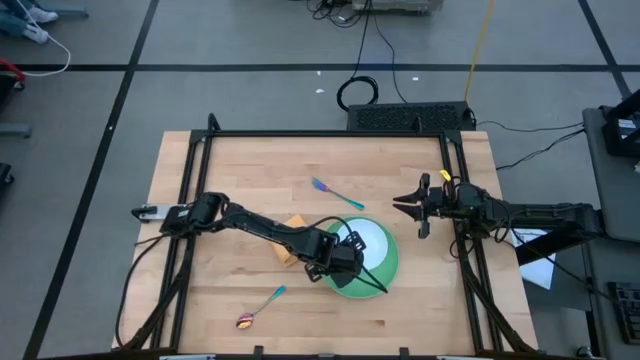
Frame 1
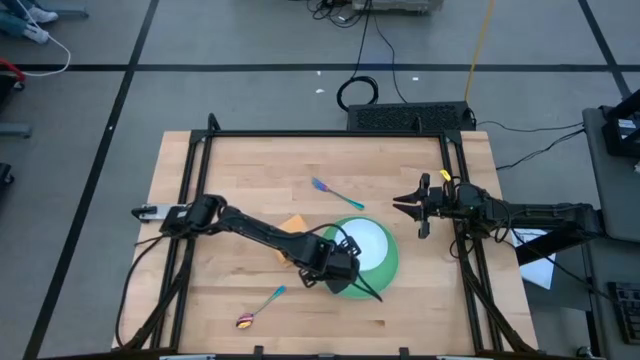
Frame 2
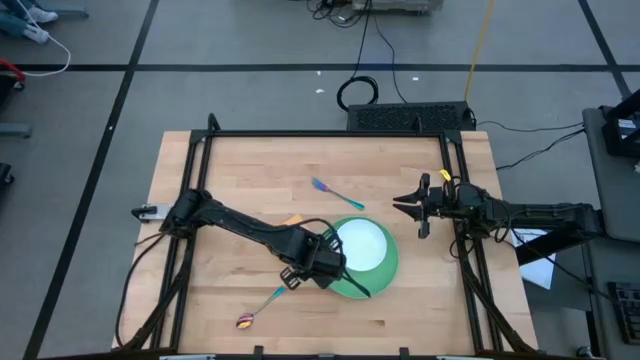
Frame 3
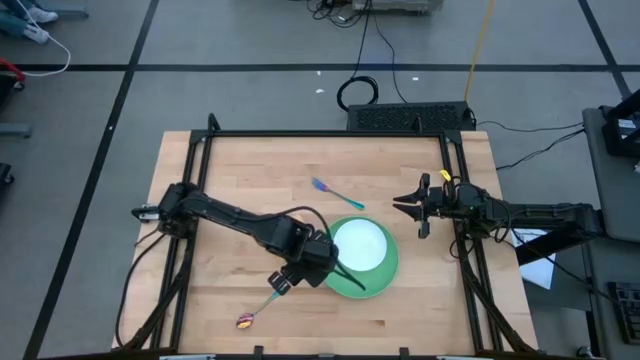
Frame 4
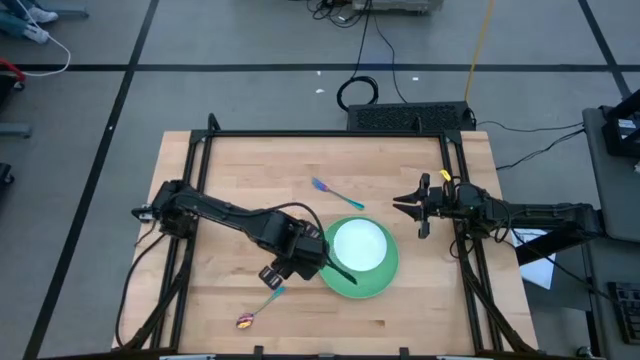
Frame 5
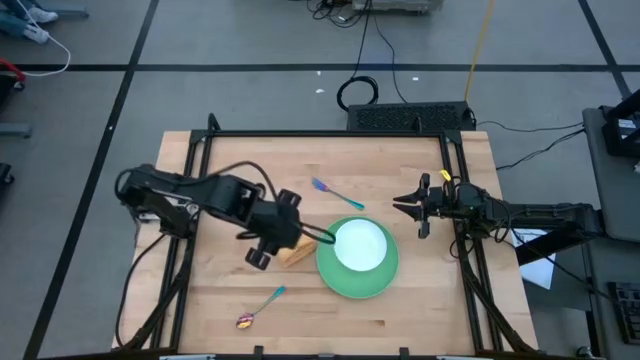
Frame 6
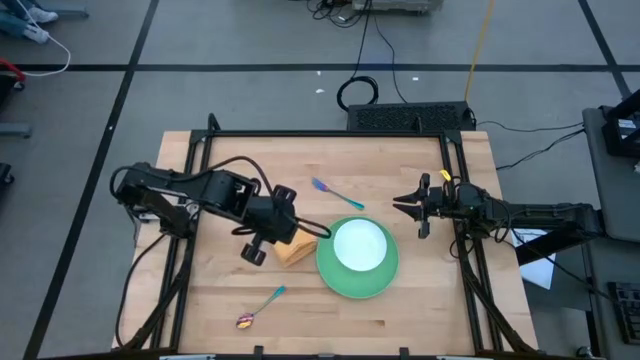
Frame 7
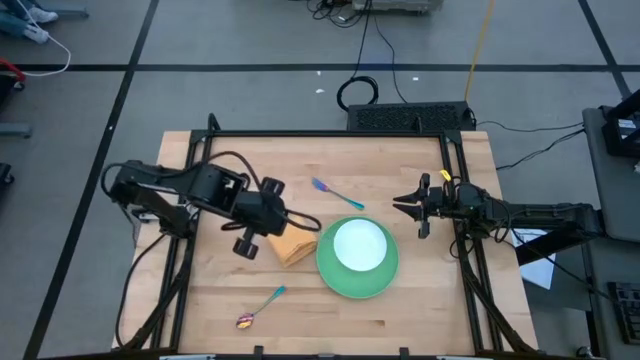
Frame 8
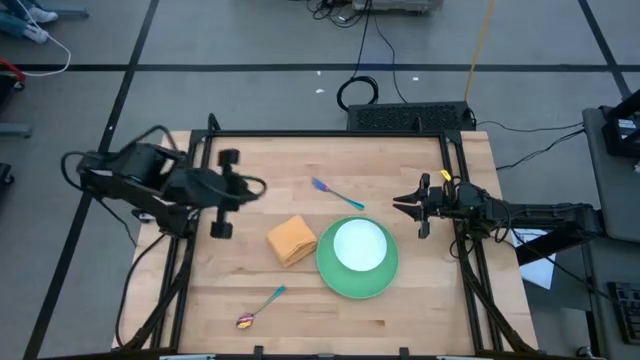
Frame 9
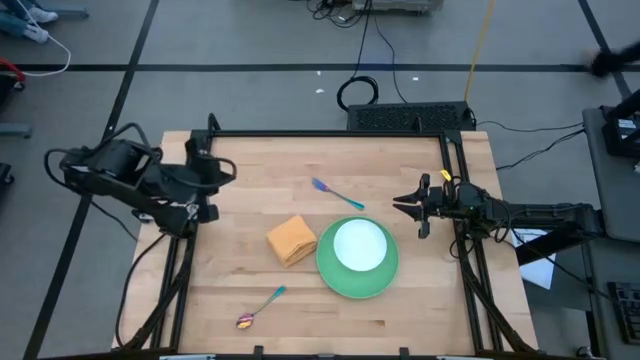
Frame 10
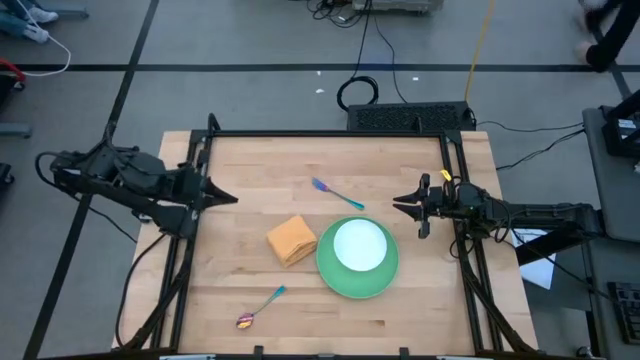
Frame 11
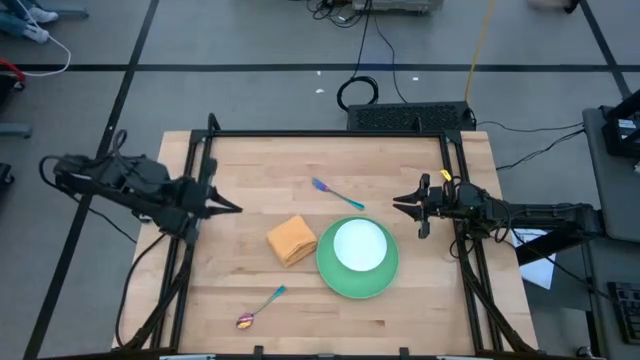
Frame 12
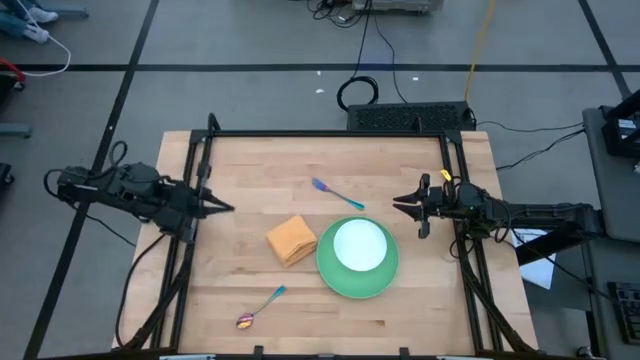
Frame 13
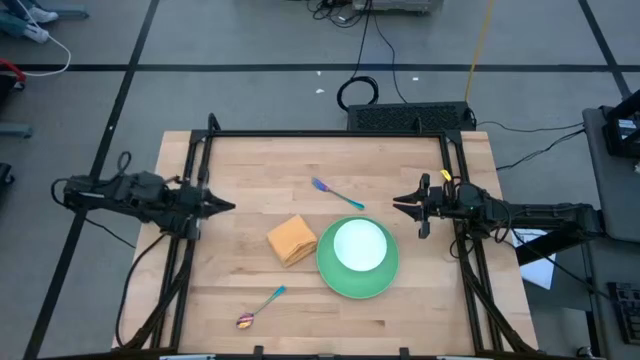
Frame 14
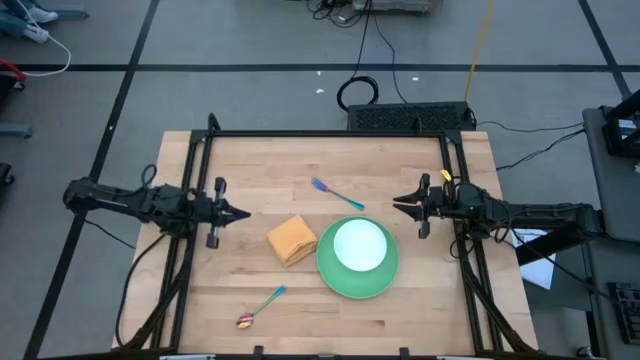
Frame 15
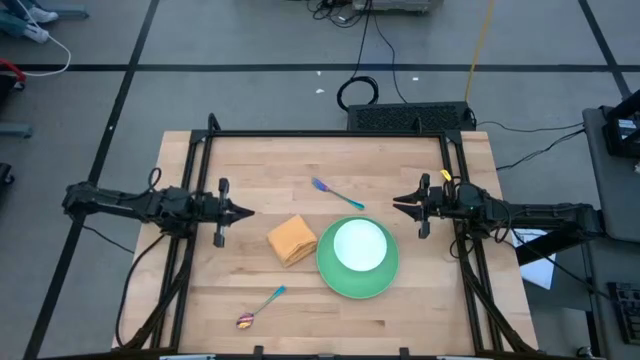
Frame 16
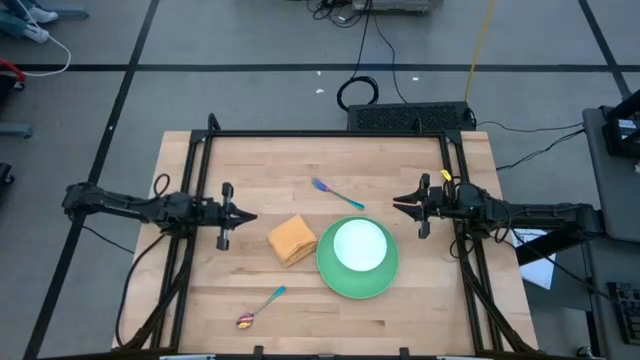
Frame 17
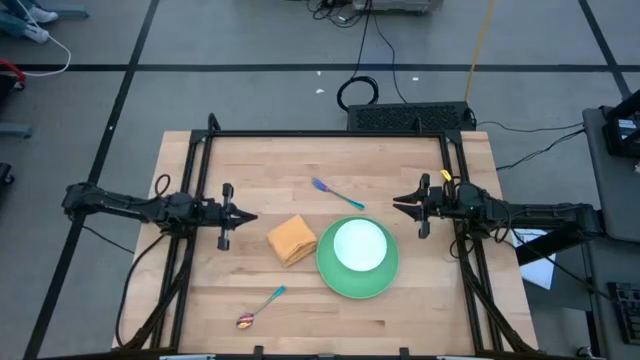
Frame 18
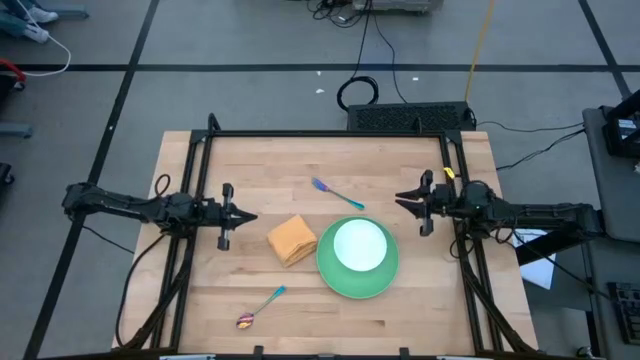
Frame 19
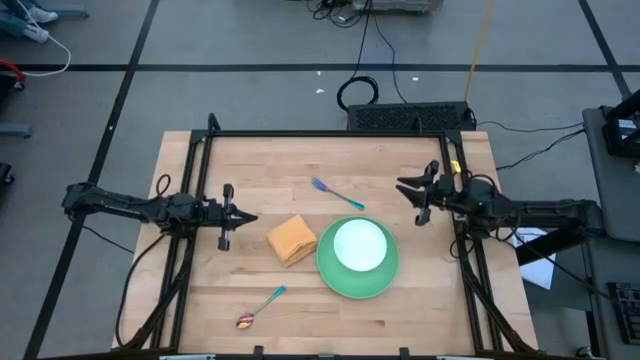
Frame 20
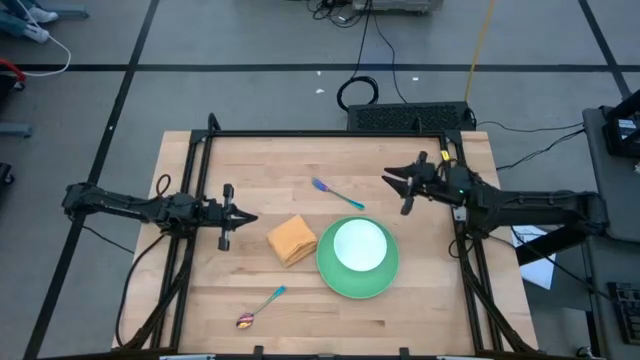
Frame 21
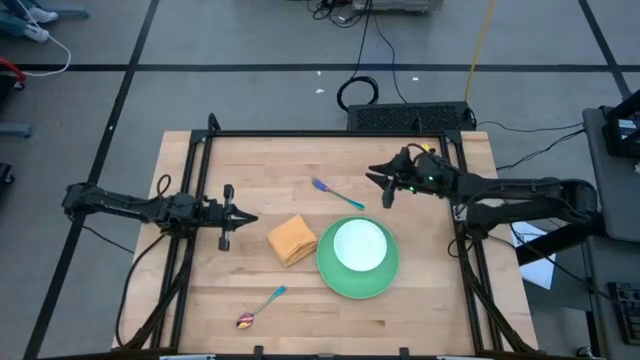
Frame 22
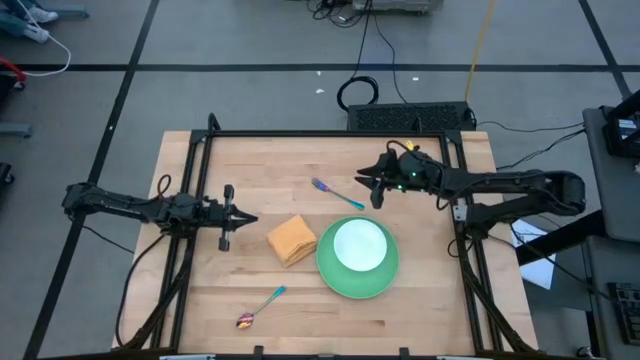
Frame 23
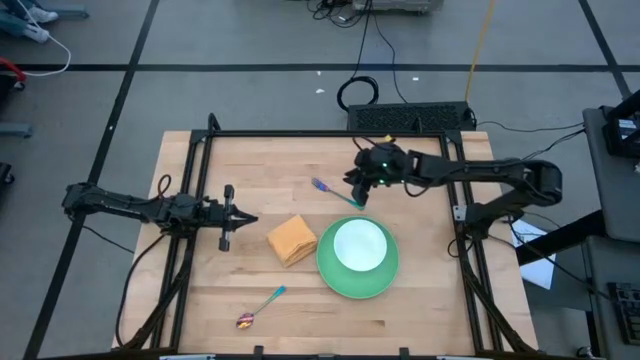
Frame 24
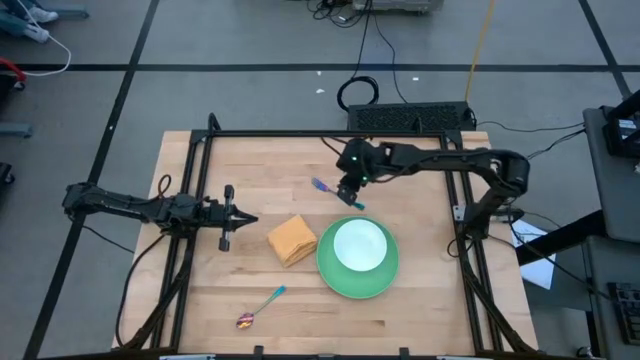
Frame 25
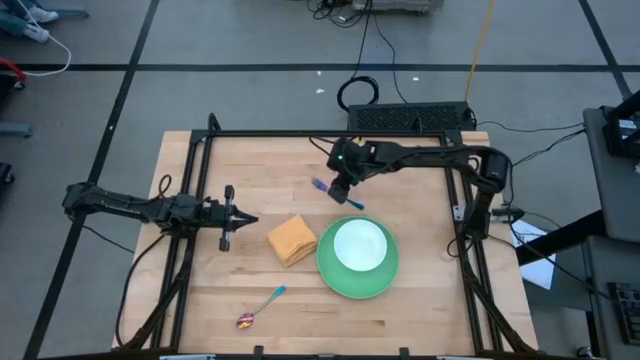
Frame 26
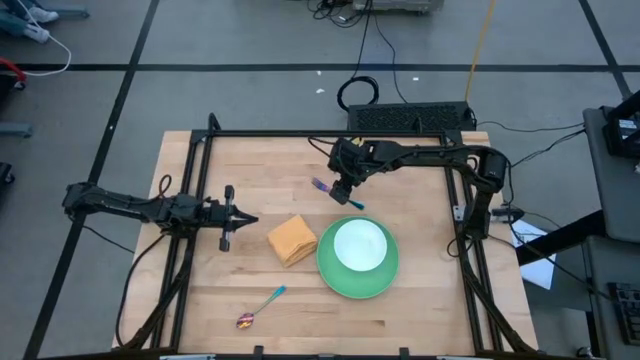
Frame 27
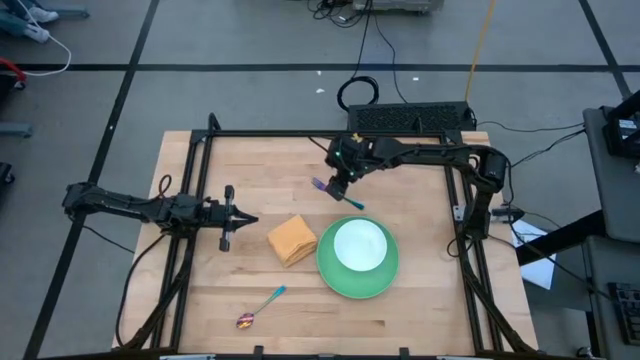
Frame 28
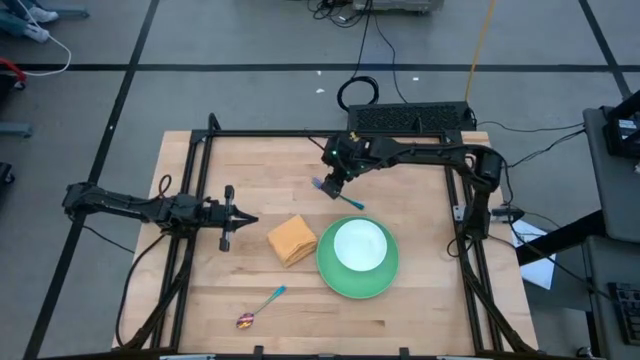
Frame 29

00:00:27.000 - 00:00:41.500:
Task: Set table place
Put the purple fork to the right of the light green plate

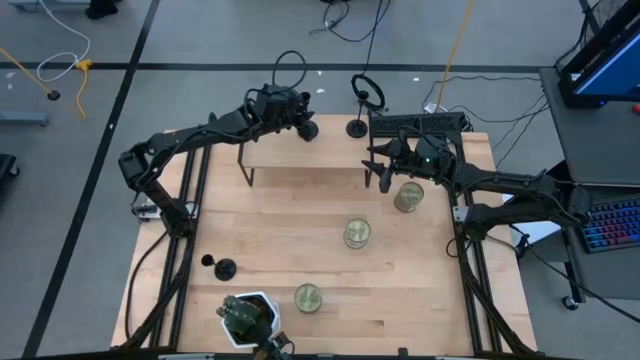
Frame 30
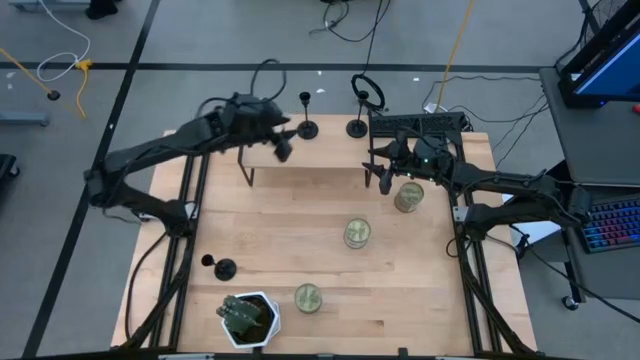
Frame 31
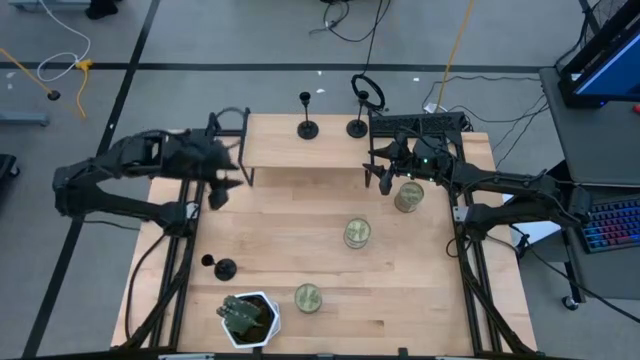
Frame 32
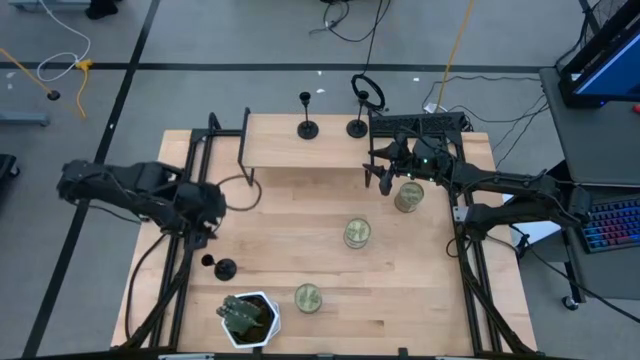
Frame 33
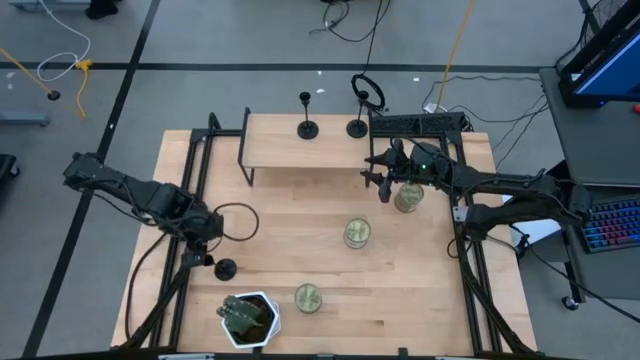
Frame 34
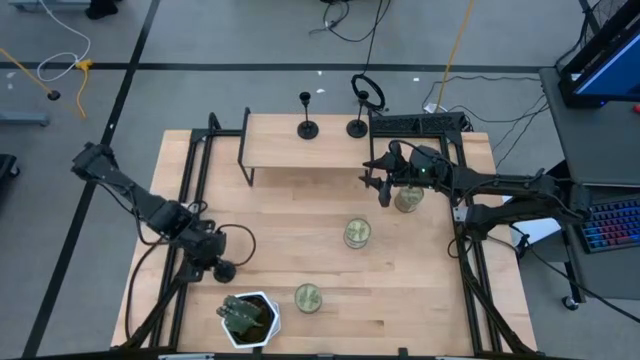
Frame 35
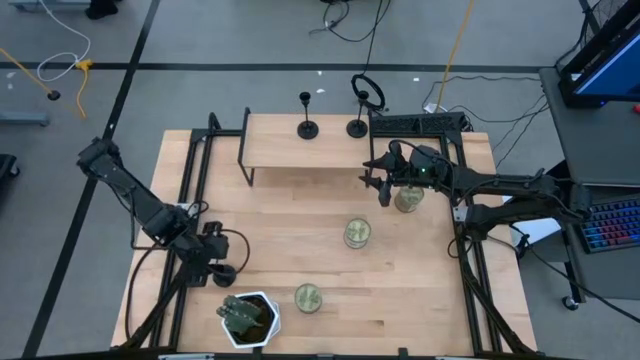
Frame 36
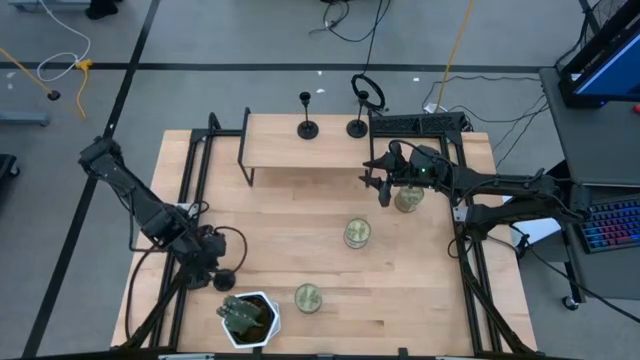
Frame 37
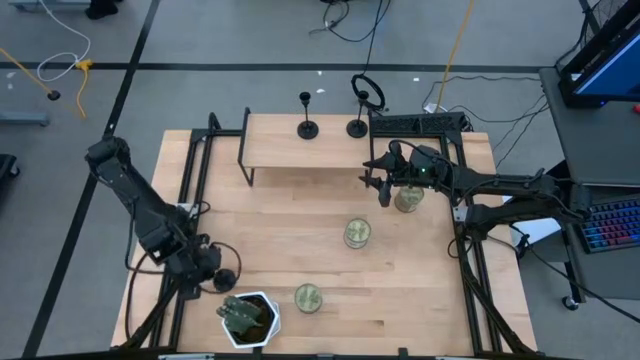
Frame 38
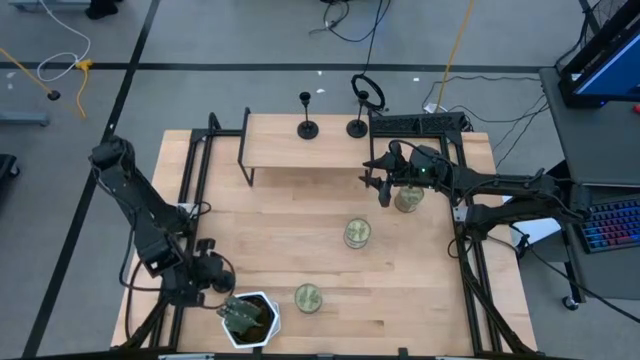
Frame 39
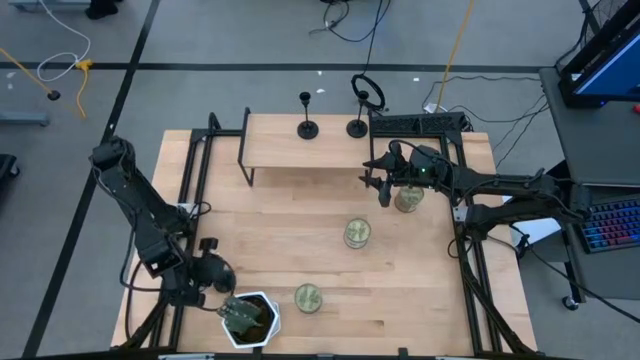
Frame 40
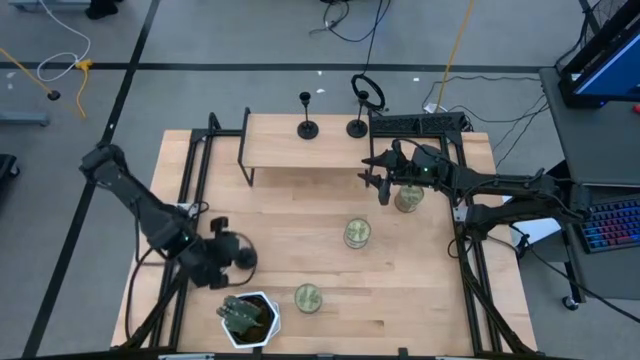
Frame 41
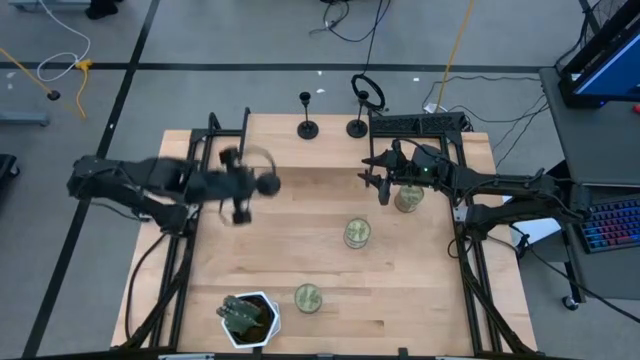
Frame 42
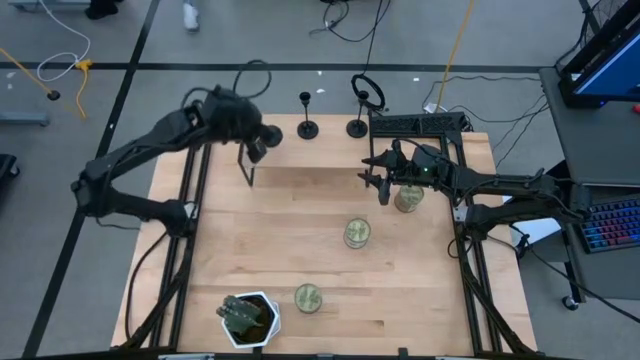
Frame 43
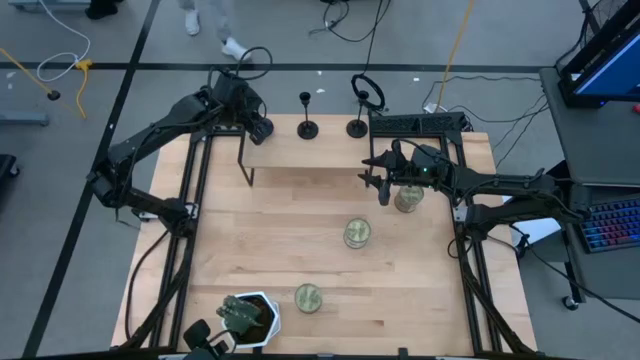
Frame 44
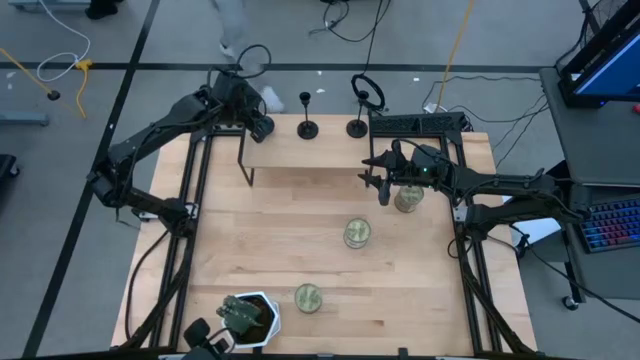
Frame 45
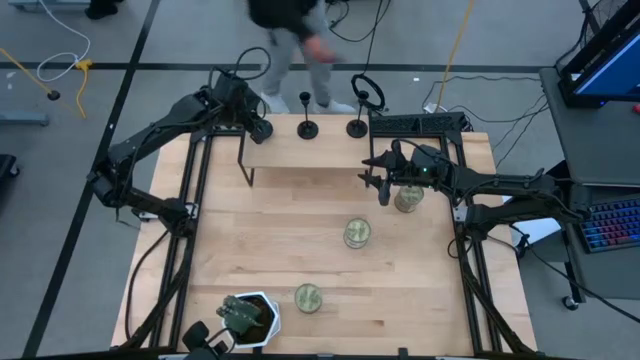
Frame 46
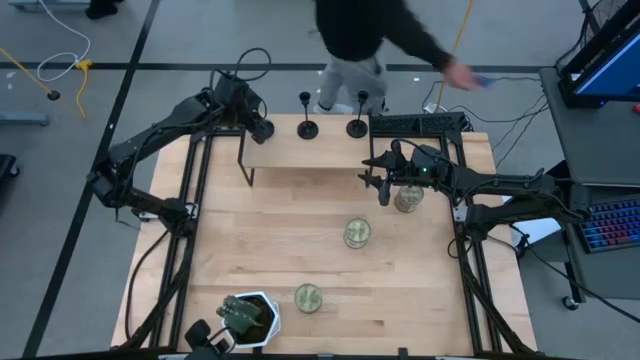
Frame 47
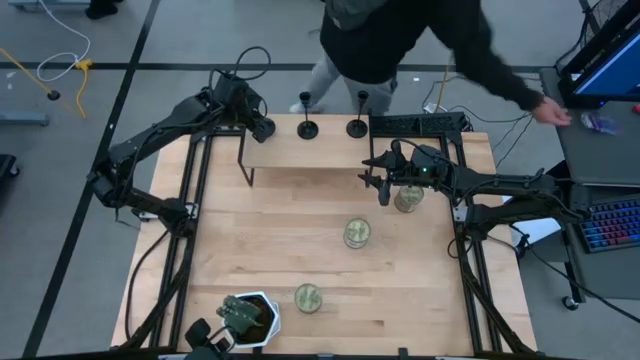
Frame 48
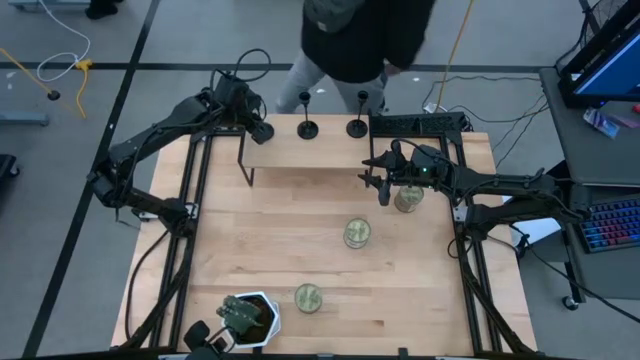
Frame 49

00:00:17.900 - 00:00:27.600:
Task: Pick & Place candle stick holders
Put the candle holder on the shelf
